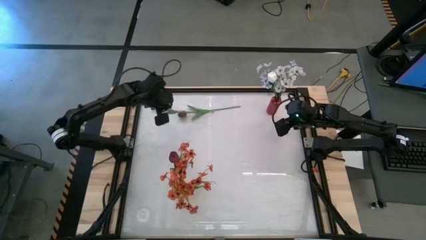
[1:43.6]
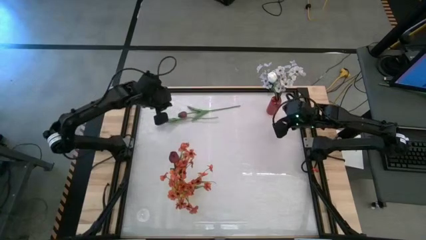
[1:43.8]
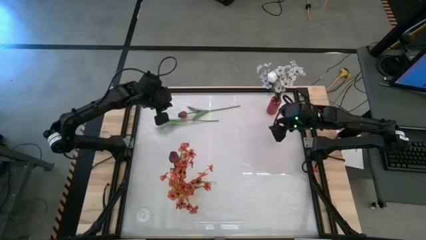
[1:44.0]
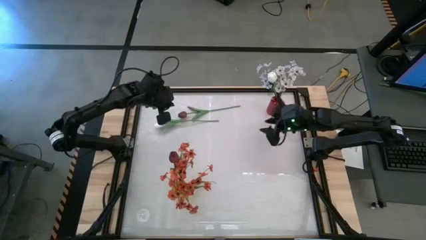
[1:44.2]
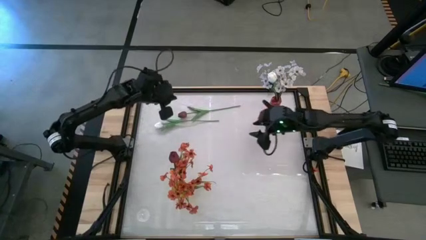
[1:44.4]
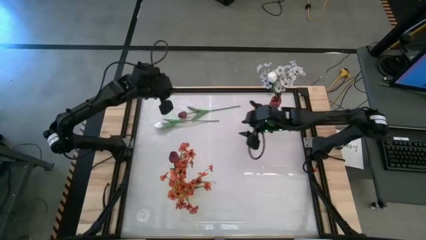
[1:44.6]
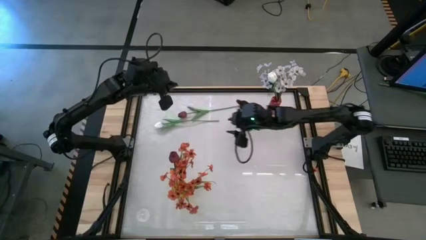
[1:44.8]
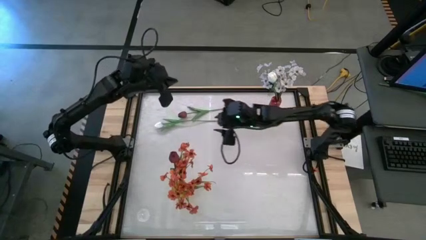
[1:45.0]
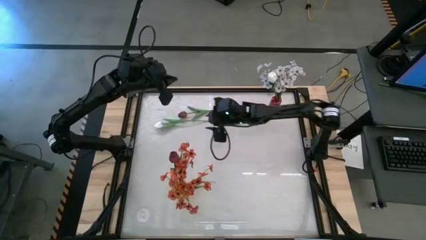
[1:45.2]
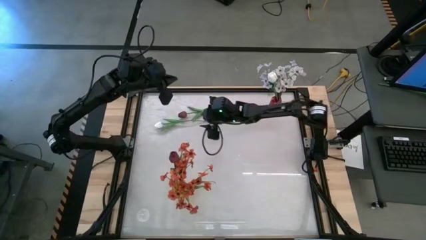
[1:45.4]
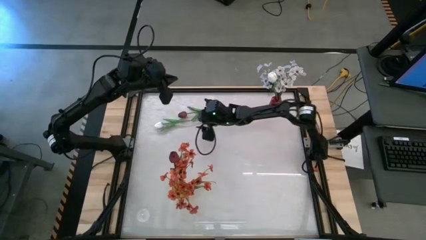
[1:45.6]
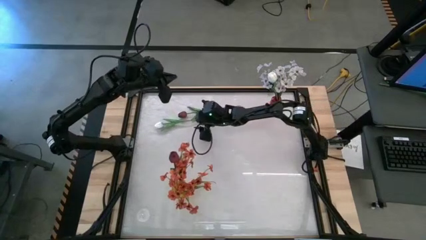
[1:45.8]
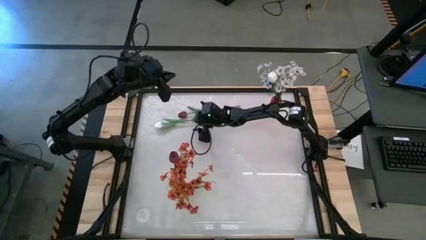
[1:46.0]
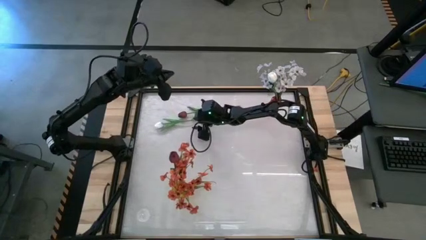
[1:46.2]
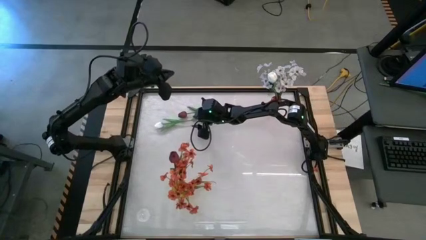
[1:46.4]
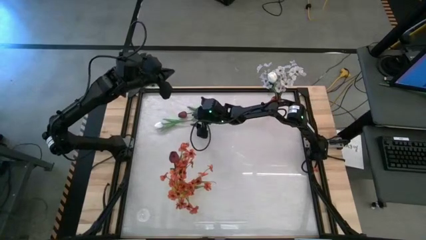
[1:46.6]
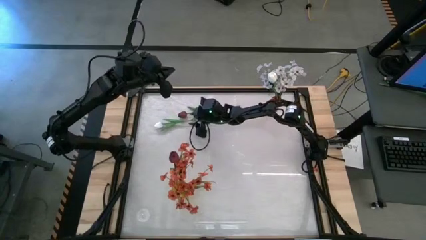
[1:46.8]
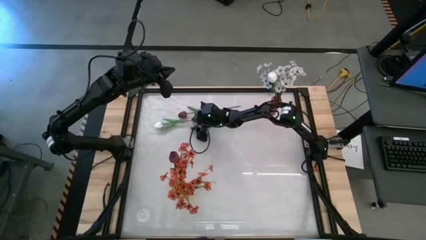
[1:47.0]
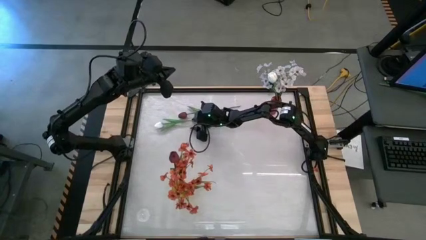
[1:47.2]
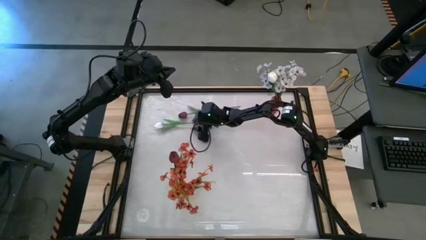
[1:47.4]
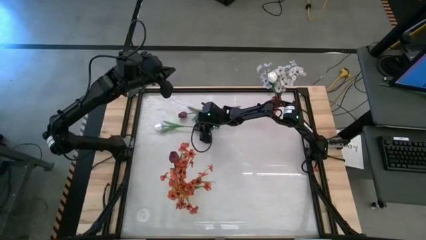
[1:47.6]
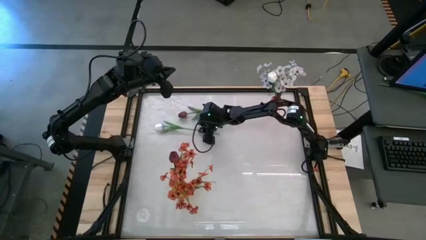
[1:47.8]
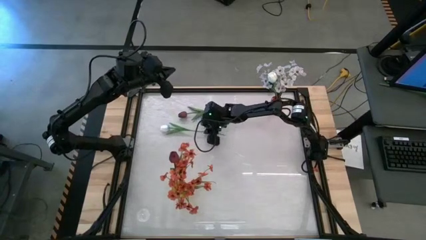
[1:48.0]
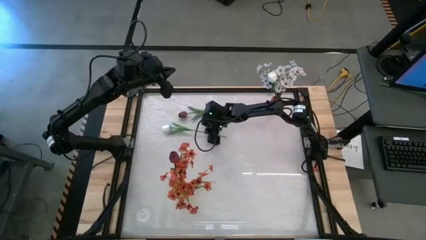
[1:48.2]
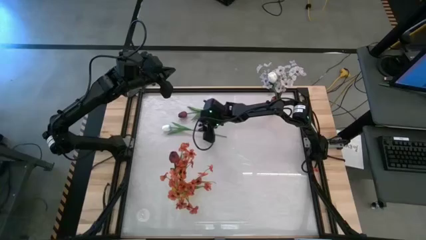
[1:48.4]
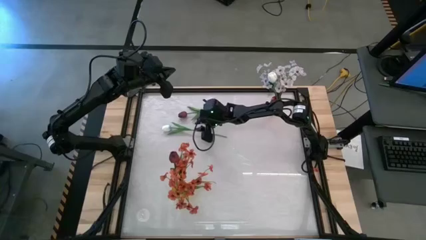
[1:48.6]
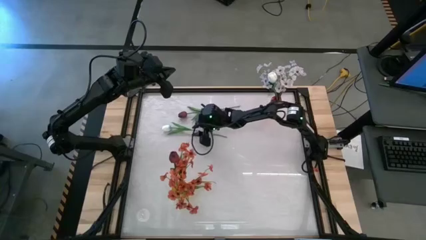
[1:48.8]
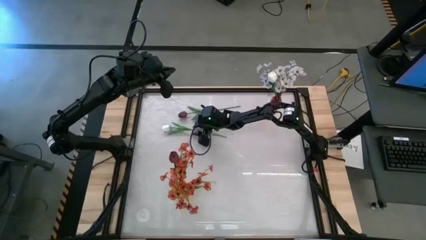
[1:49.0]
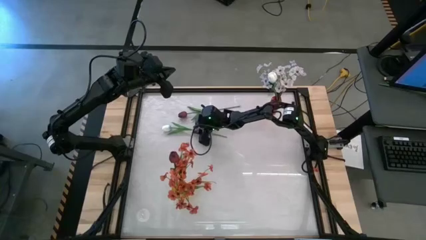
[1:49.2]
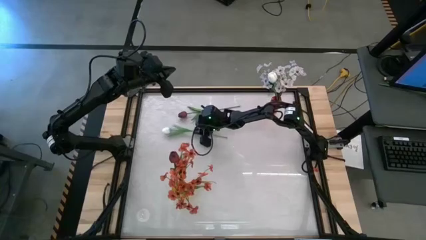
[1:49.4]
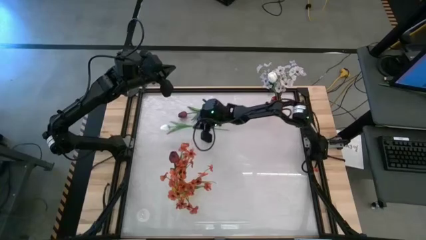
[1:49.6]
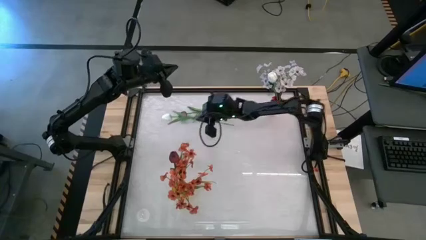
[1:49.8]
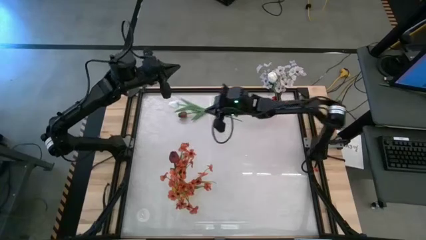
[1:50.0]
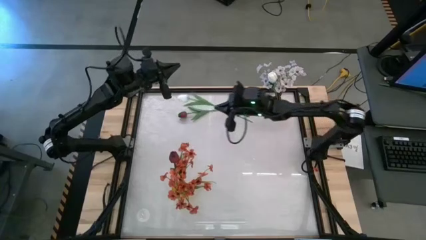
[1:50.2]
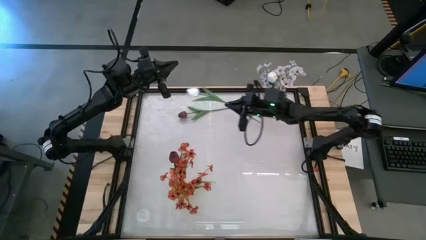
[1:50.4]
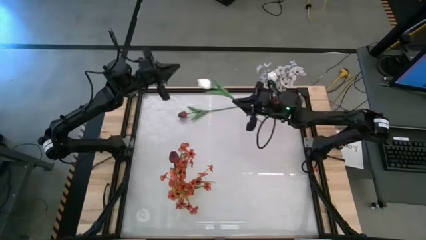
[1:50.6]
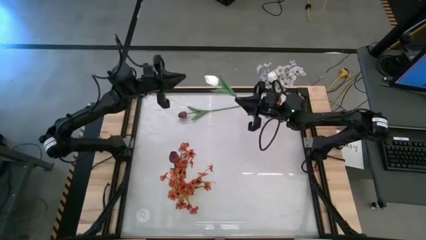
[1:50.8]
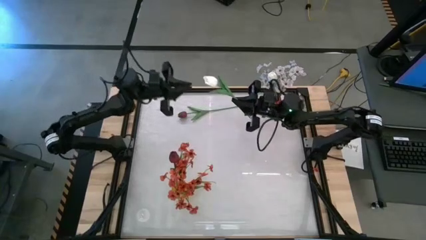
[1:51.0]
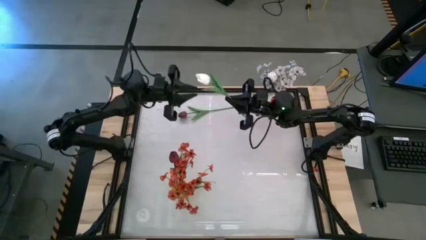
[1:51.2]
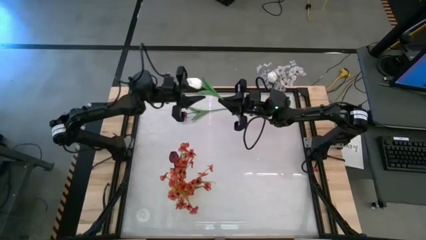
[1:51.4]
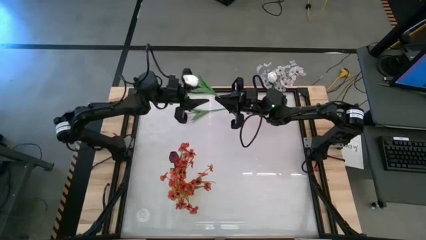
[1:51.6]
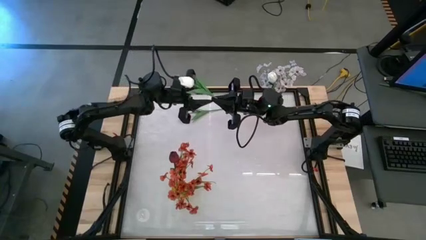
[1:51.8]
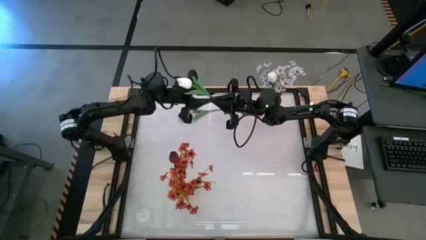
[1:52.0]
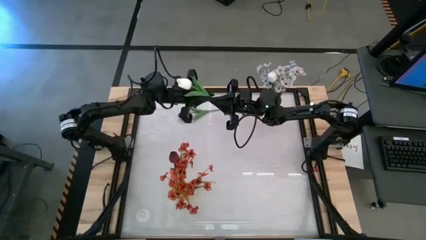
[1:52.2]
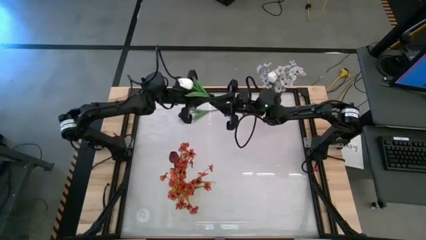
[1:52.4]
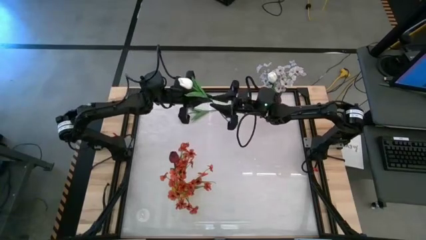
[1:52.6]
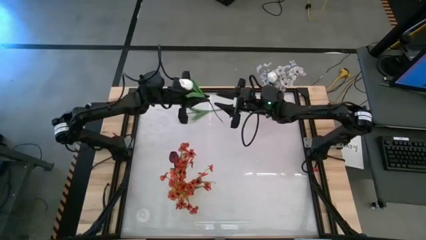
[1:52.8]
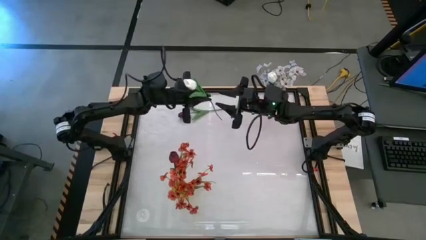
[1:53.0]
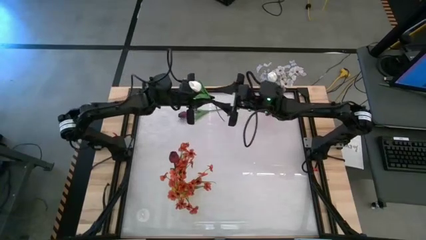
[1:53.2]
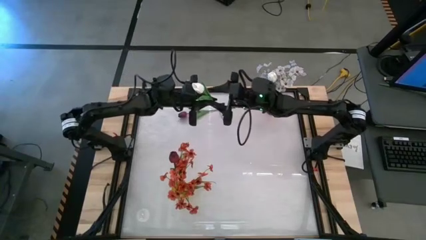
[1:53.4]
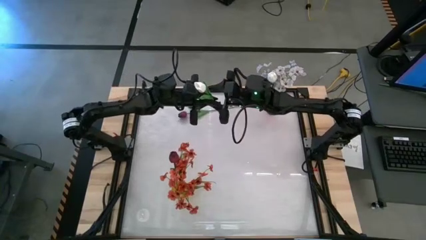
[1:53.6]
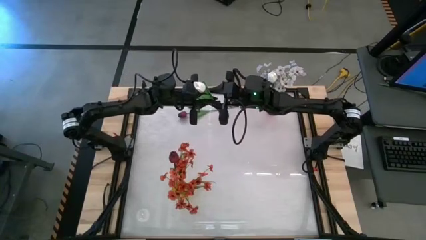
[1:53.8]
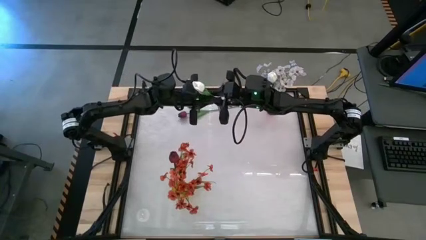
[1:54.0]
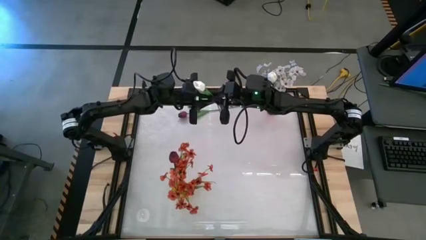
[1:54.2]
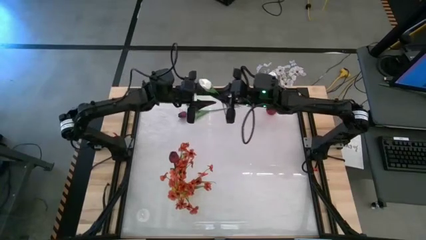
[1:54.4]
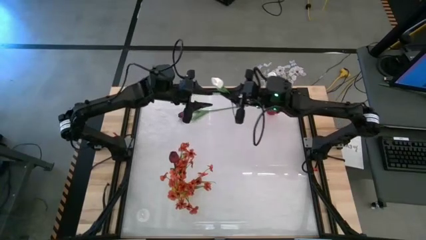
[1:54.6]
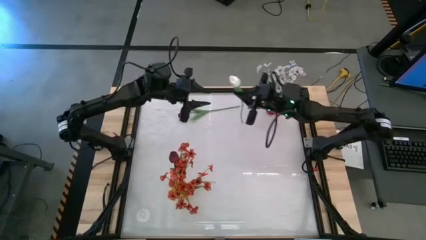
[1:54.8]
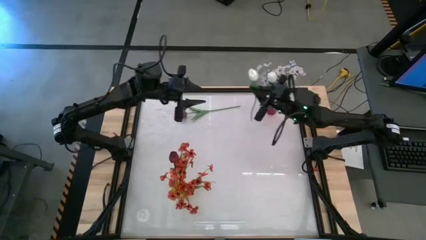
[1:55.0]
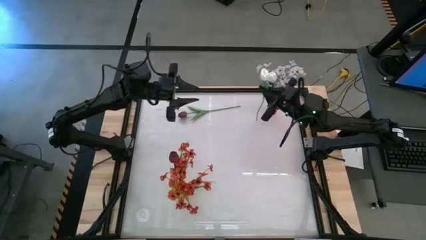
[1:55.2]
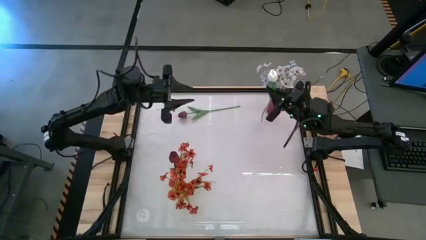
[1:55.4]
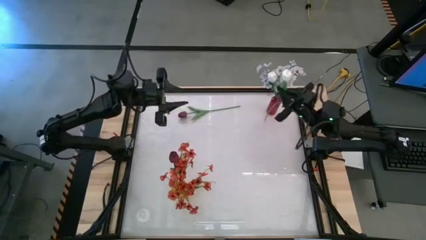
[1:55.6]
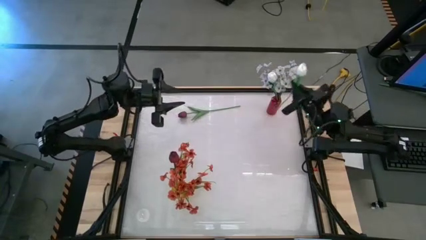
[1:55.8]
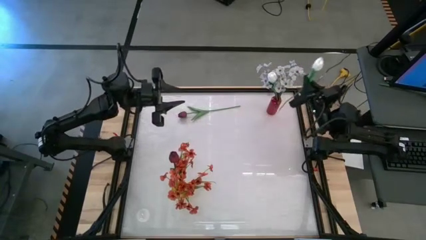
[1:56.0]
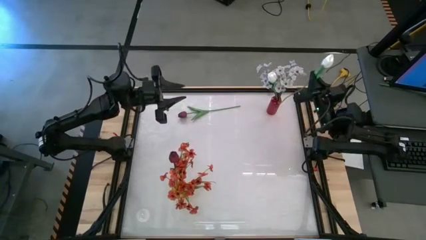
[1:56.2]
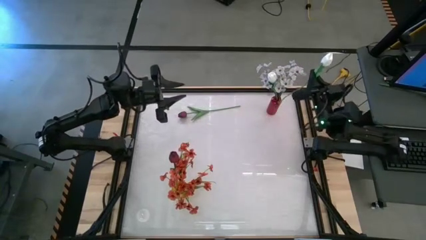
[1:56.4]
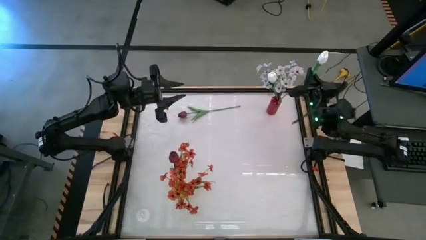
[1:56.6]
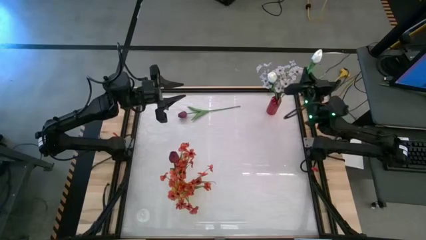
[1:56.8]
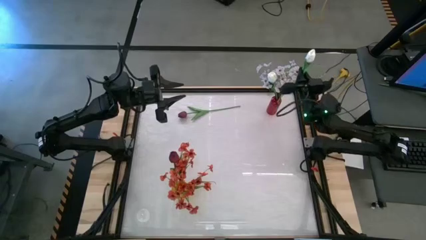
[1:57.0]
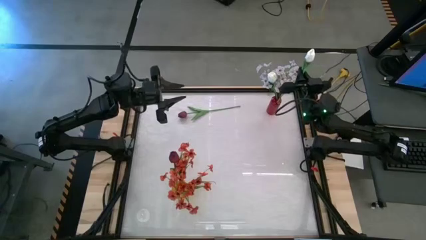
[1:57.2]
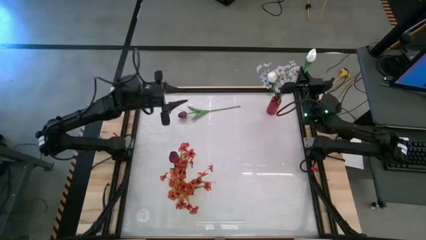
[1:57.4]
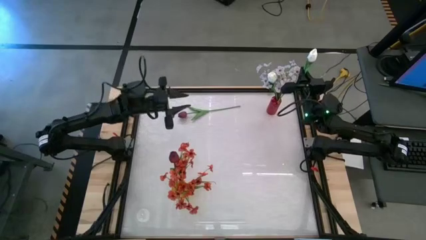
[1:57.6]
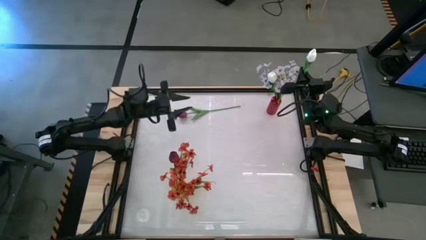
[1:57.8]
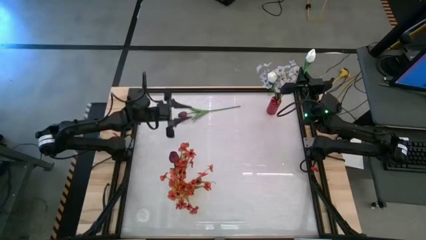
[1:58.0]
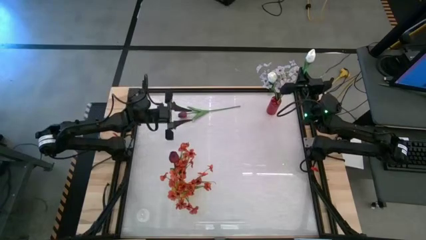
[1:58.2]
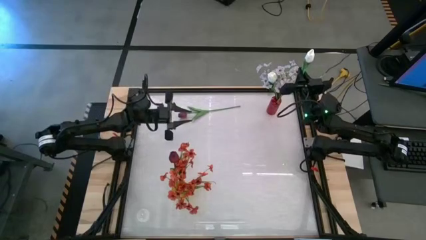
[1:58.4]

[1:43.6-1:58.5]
Task: Sort flowers into vase by color
Put the white tulip into the red vase
